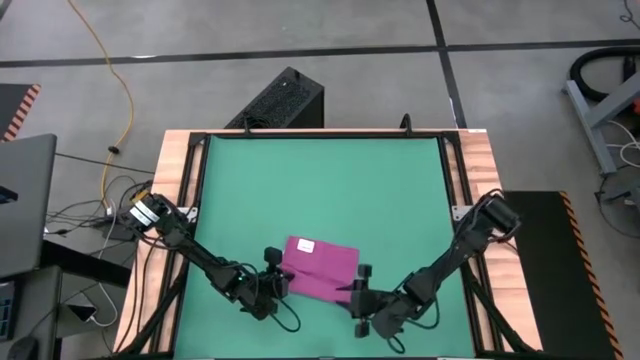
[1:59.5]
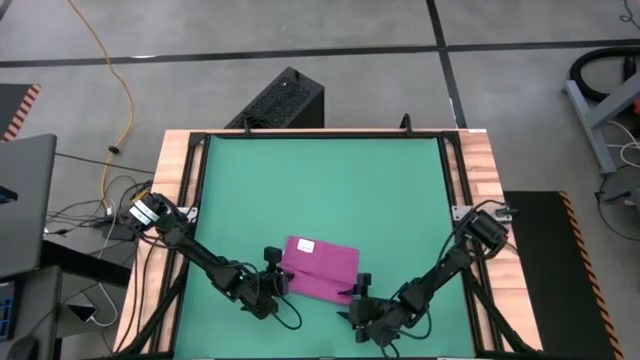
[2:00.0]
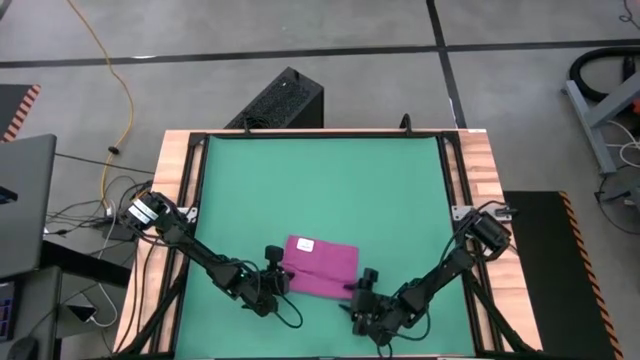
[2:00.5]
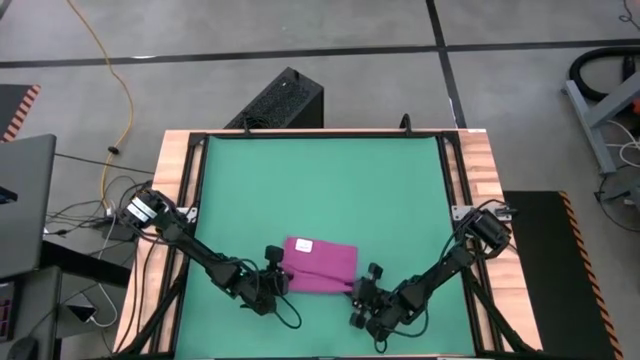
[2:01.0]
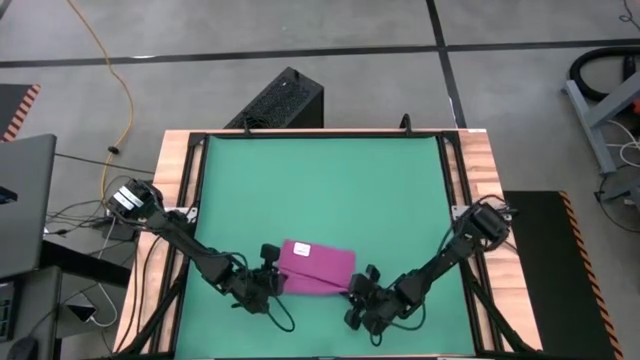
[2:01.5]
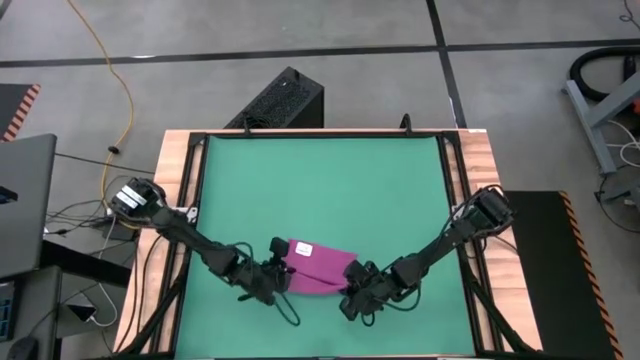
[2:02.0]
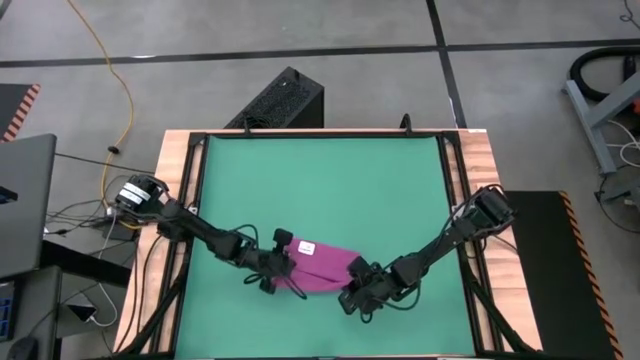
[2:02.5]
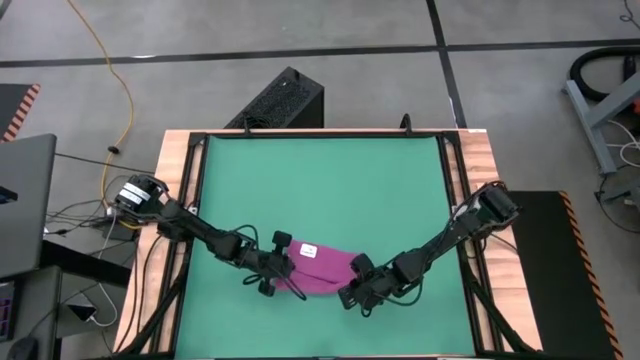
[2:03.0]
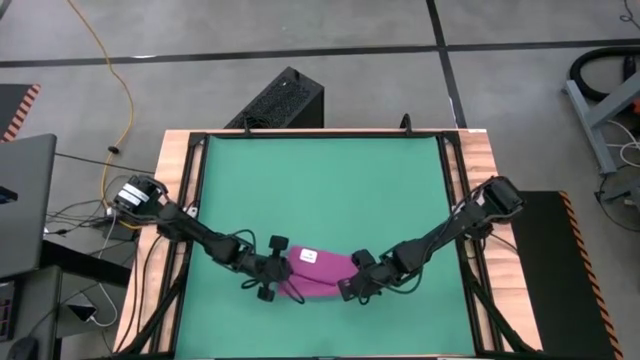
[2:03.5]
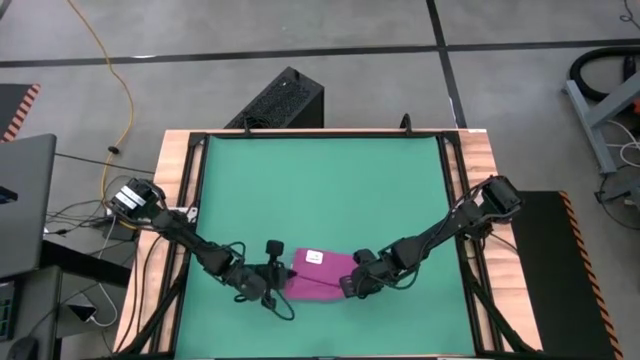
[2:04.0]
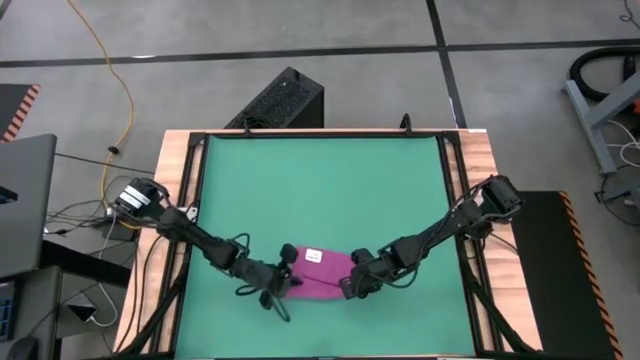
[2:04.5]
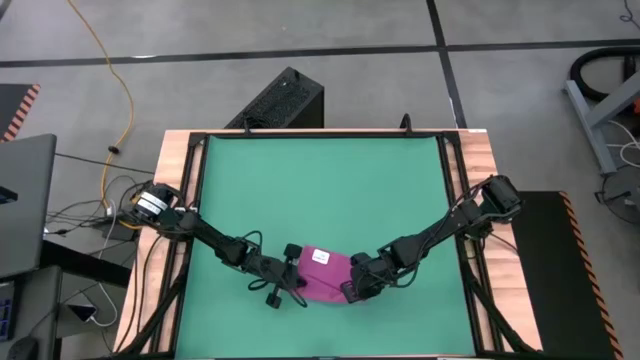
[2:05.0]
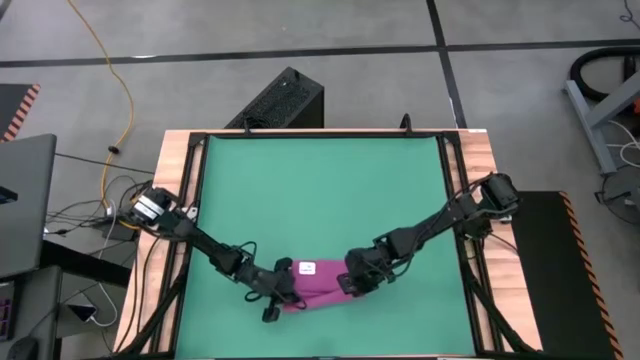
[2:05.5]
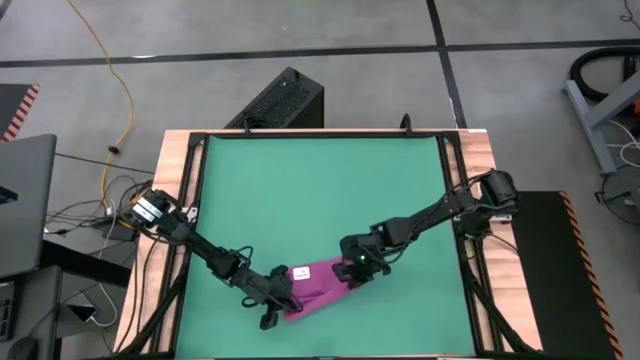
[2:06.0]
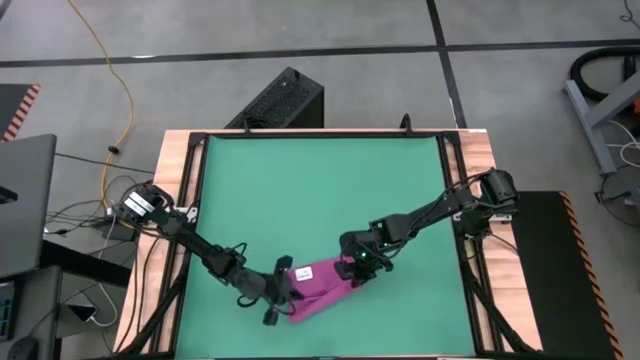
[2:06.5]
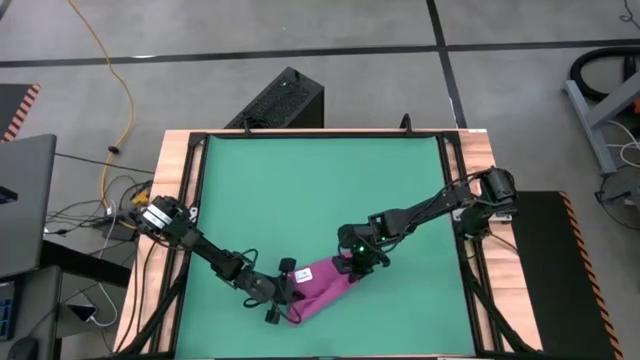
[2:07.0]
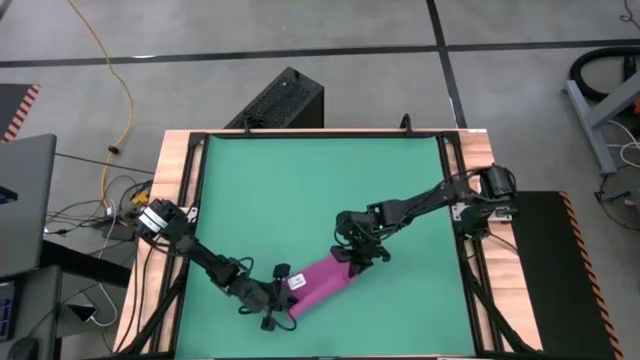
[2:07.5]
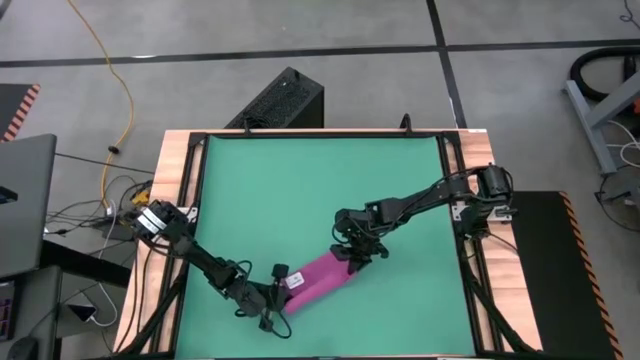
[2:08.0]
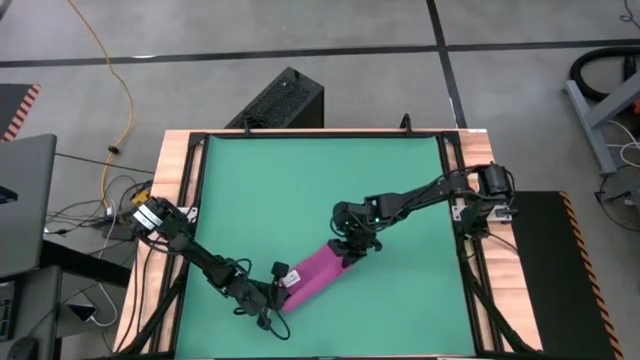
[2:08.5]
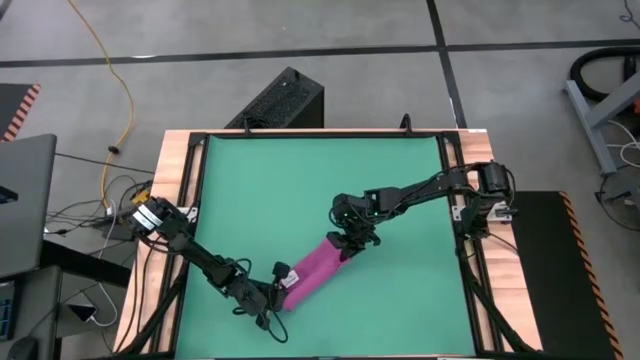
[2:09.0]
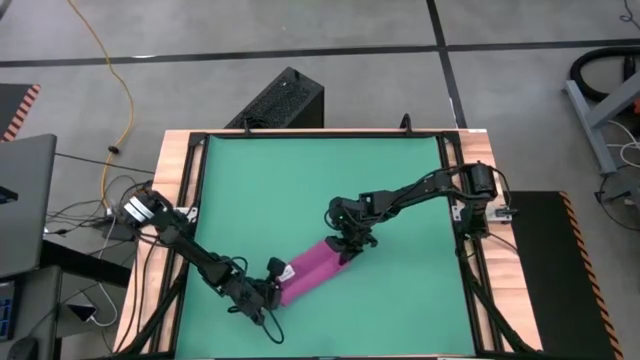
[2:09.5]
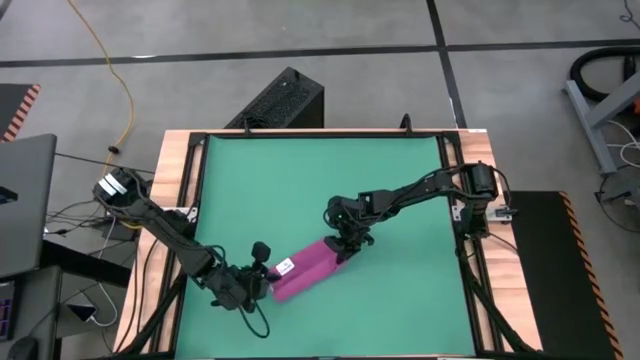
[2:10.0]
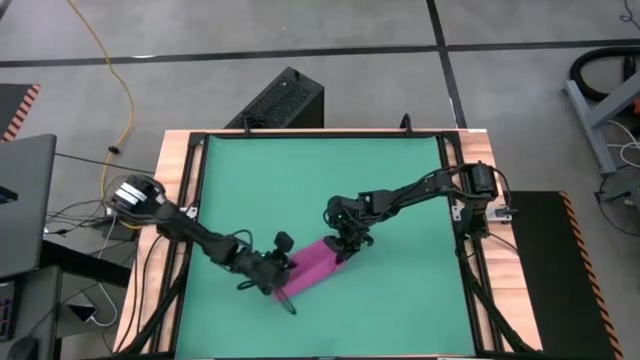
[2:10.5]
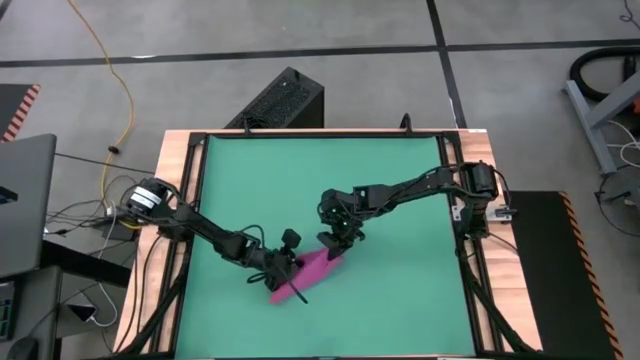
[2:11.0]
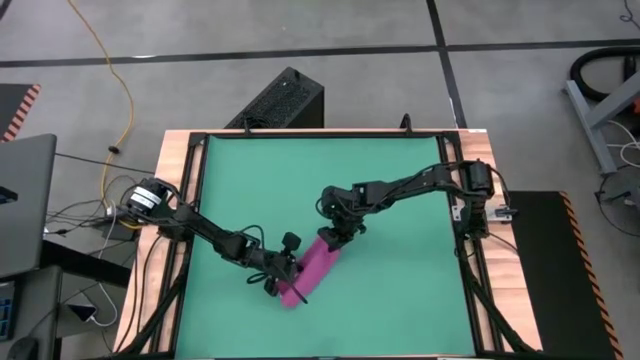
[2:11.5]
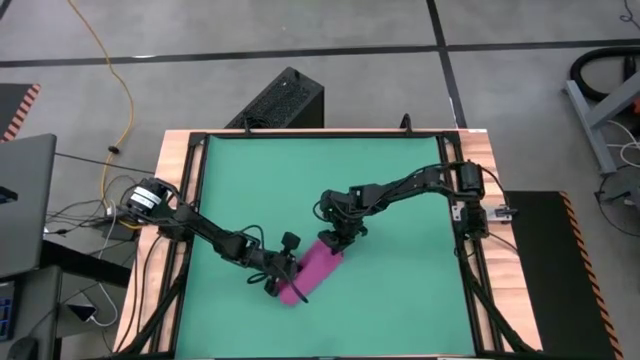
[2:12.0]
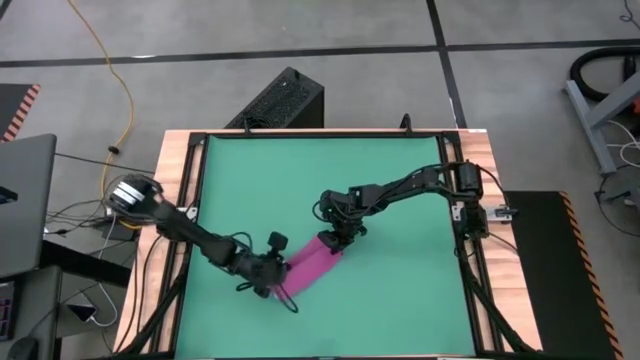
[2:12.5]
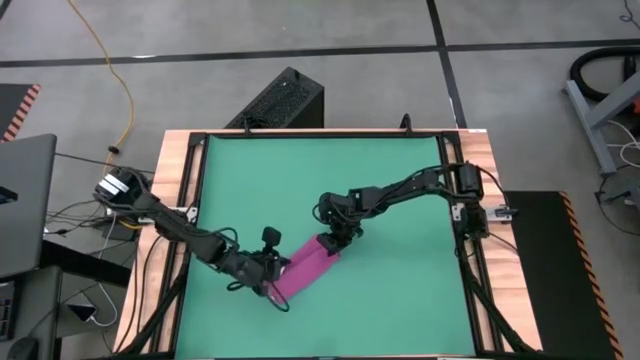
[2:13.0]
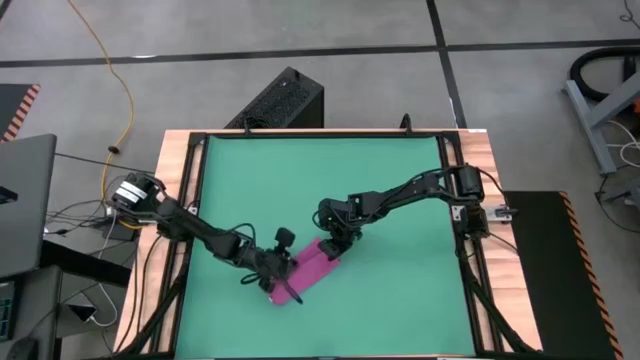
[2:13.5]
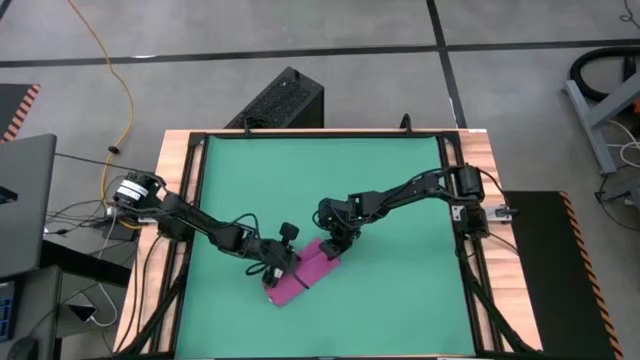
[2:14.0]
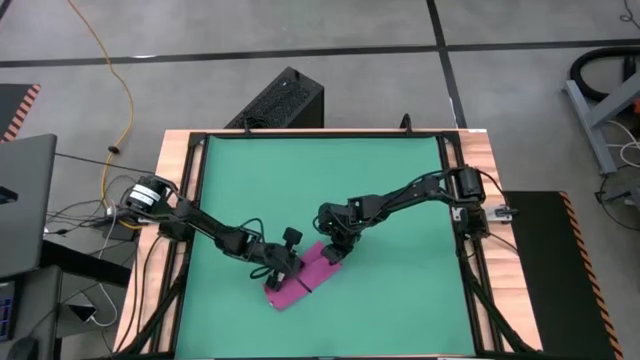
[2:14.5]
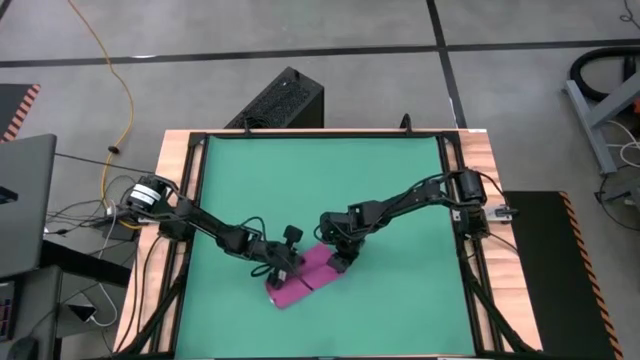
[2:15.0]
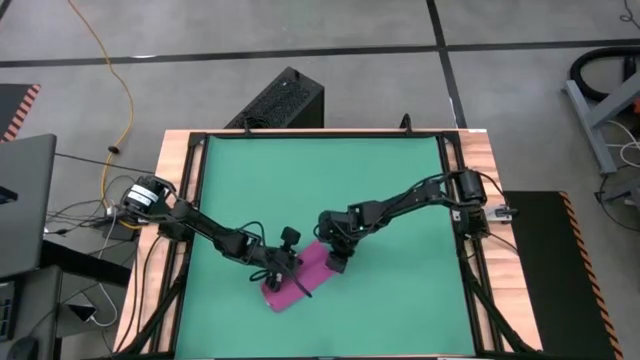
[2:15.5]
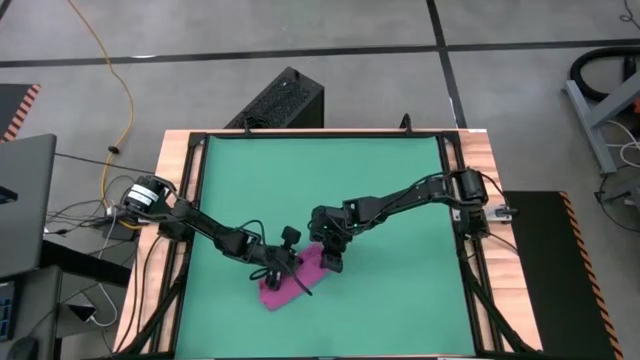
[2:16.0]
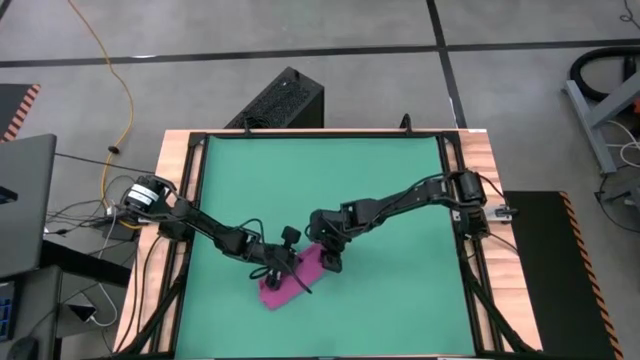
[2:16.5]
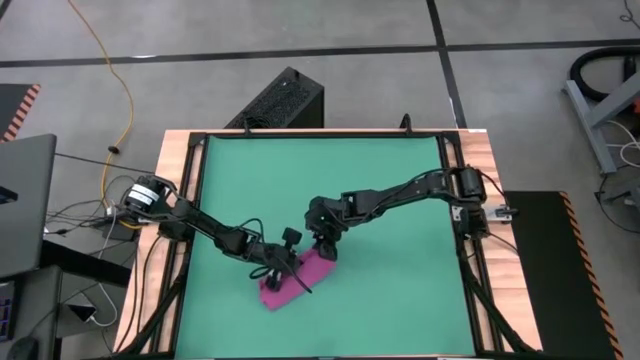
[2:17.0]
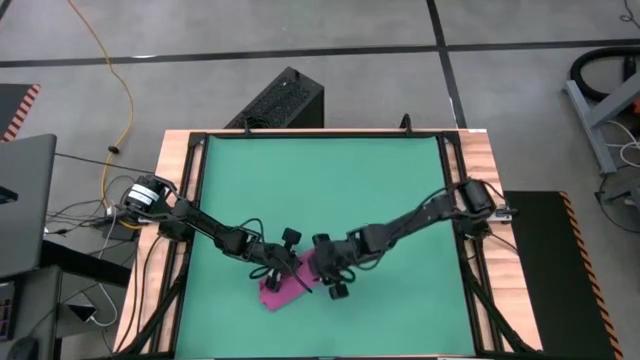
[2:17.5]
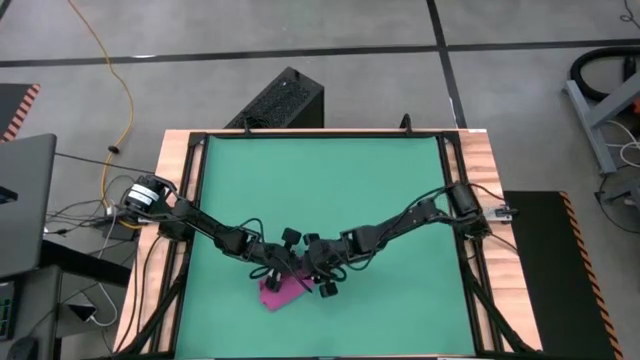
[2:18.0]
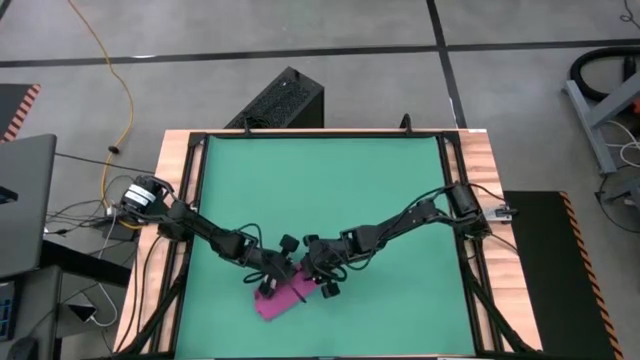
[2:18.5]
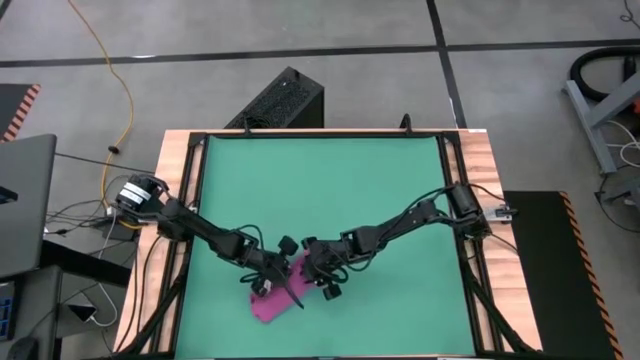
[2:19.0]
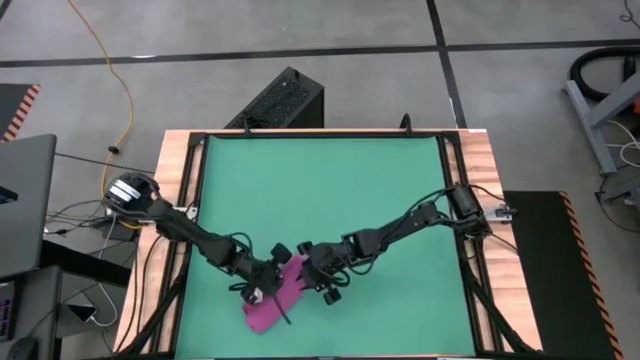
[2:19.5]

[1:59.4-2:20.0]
Task: Roll towel
Roll the pink towel

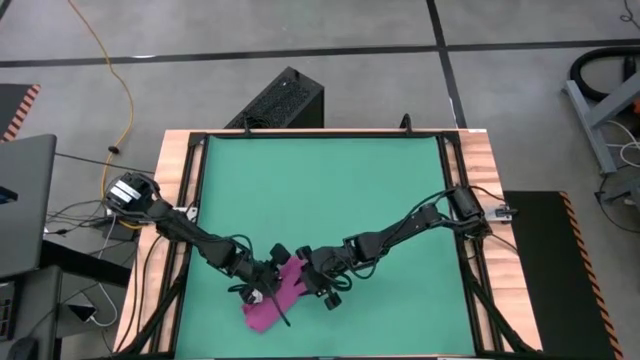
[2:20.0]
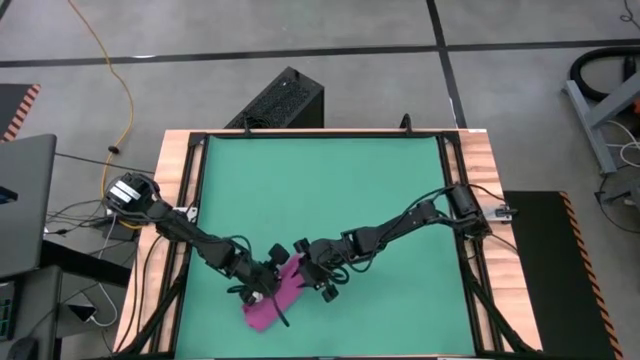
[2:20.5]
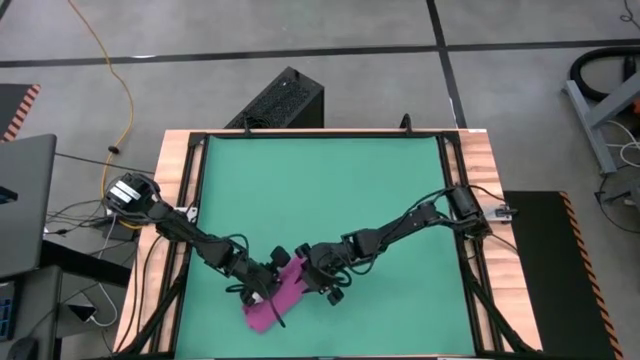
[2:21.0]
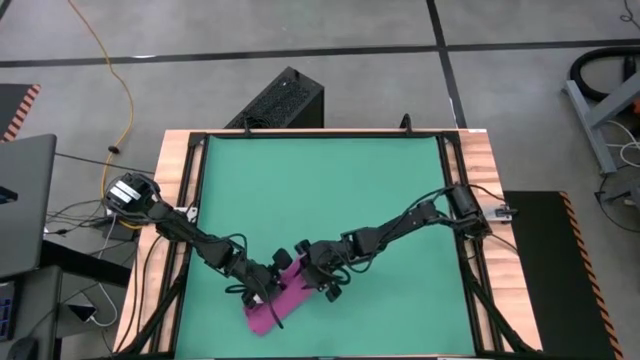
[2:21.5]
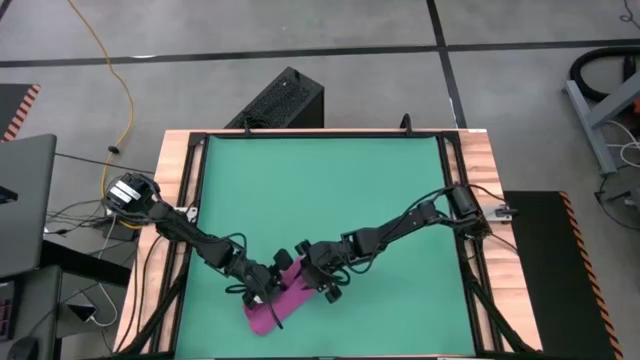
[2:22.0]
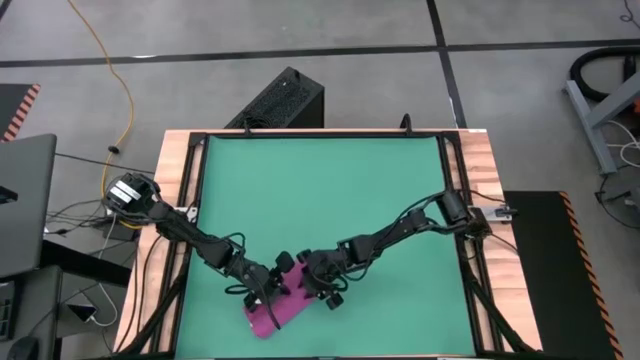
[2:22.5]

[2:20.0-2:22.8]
Roll the pink towel
